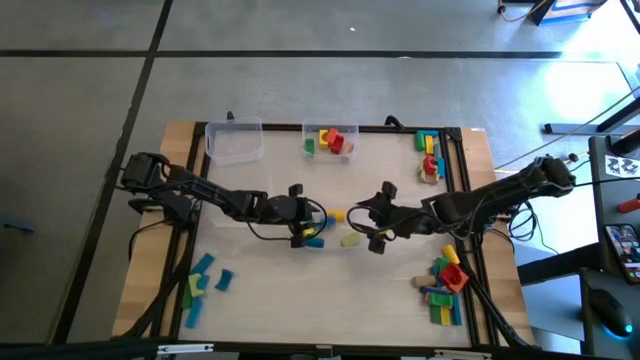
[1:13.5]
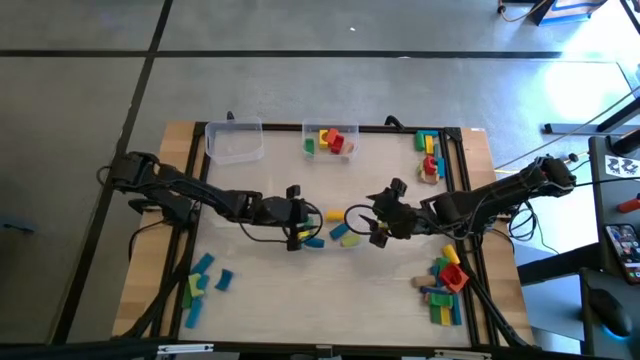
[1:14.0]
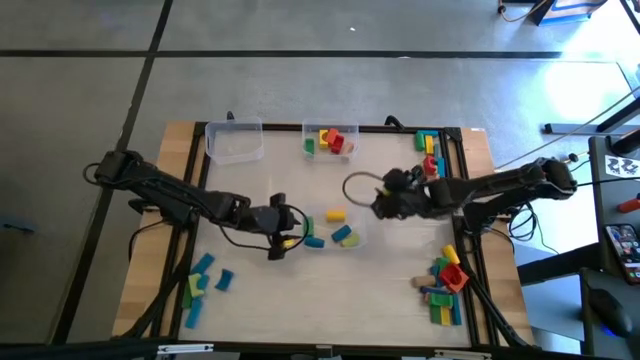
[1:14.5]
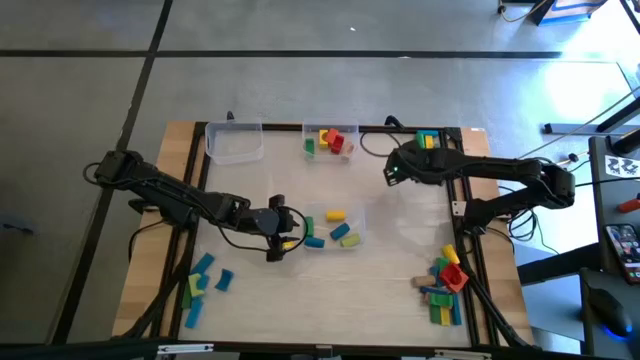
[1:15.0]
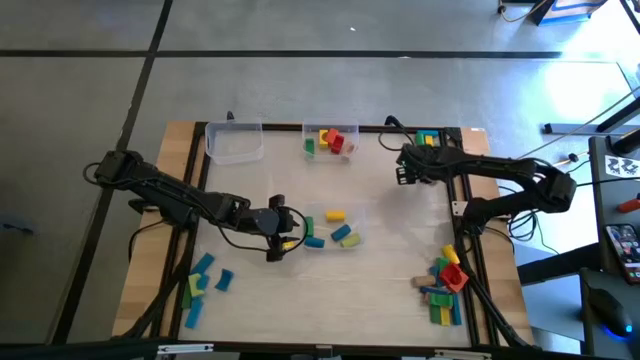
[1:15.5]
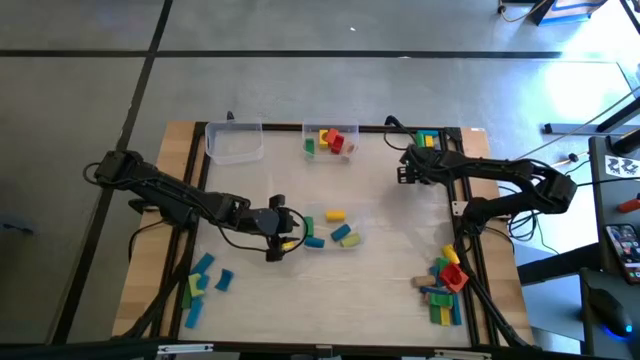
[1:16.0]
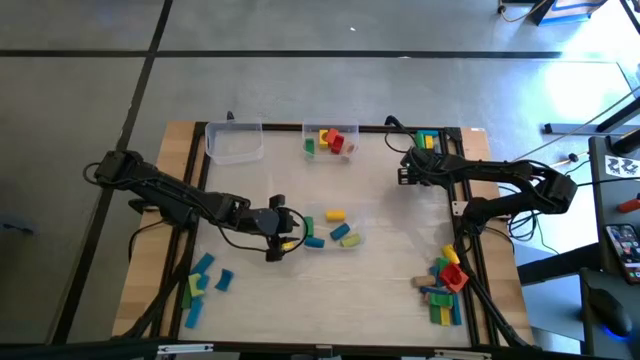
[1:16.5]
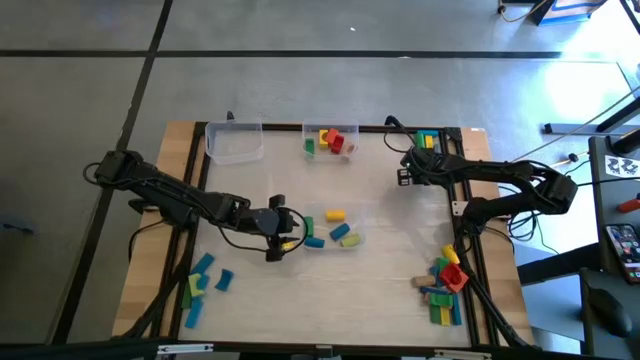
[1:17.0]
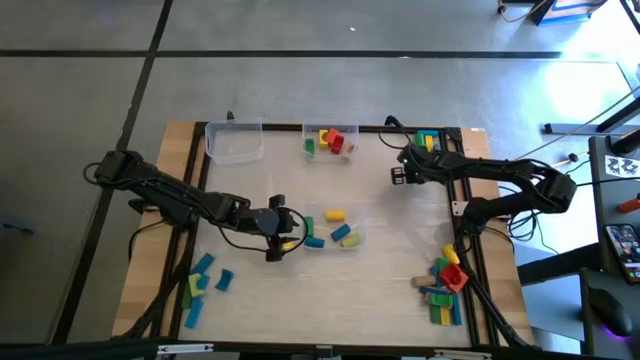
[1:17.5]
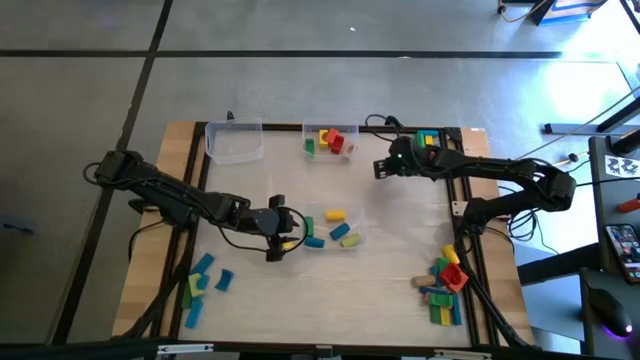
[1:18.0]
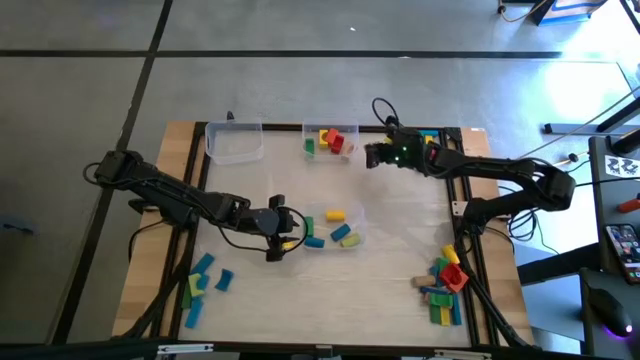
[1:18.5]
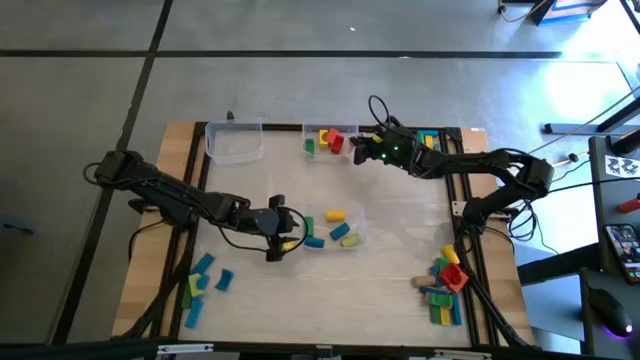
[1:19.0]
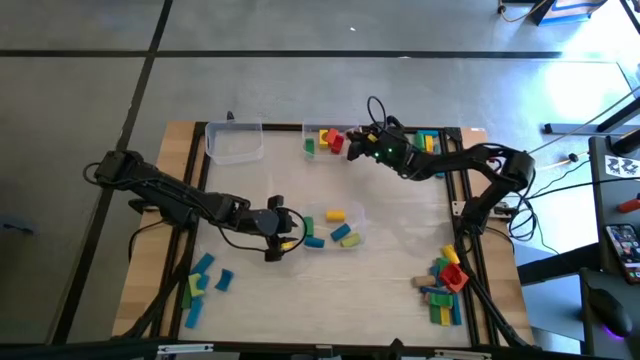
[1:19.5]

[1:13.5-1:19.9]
Task: Sort blocks by size
Put the brown arch block into the top right transparent bin

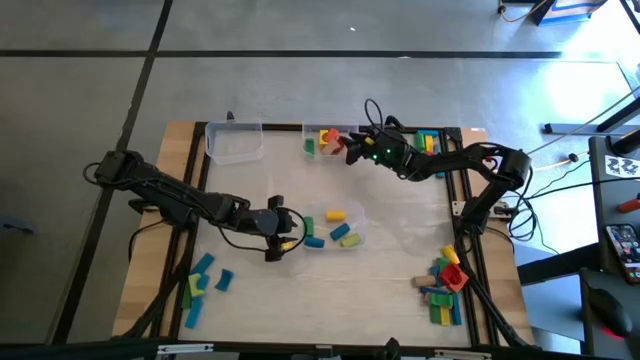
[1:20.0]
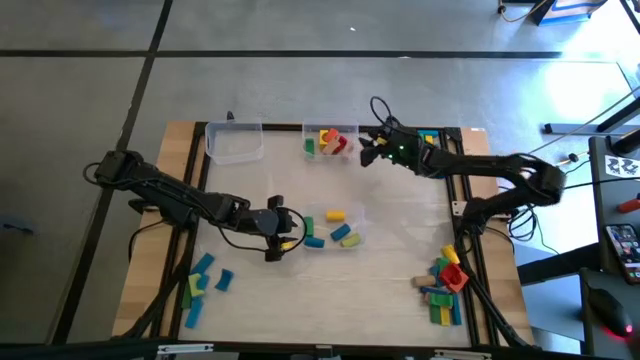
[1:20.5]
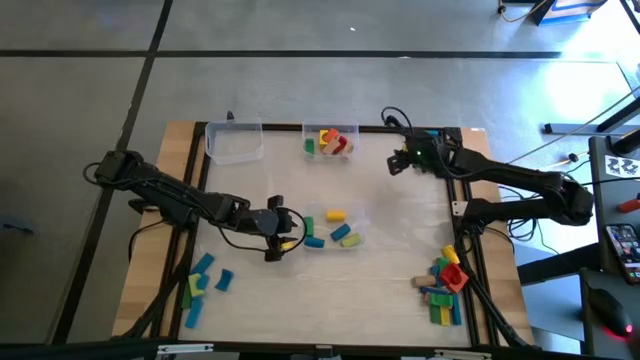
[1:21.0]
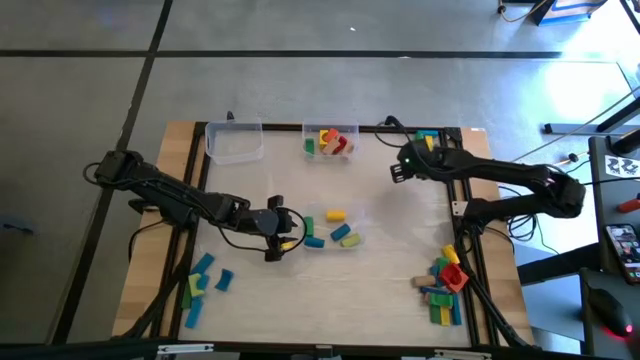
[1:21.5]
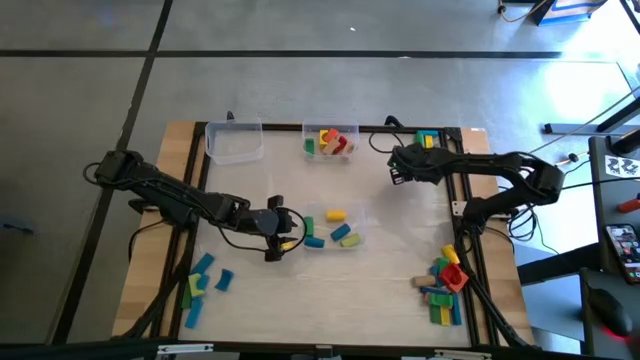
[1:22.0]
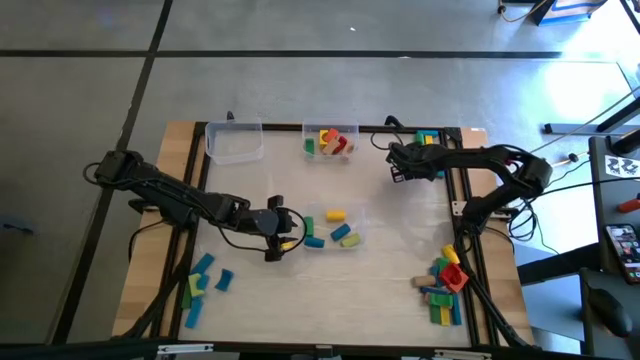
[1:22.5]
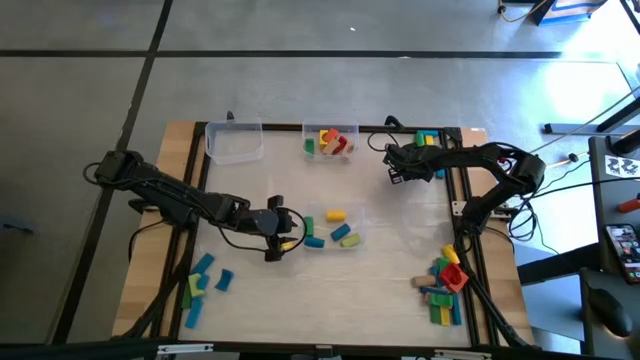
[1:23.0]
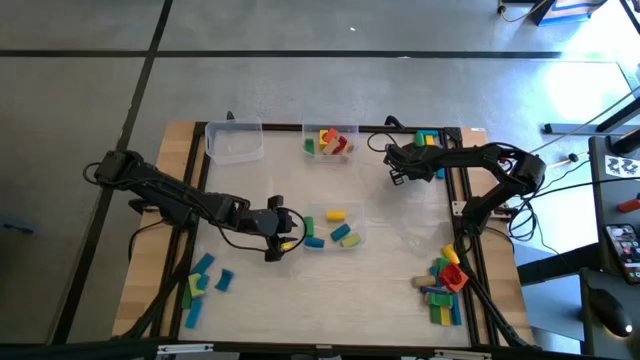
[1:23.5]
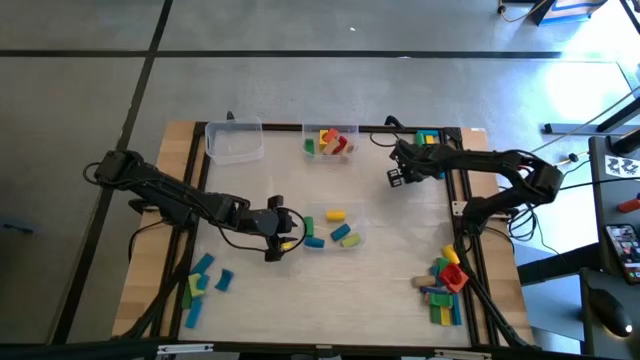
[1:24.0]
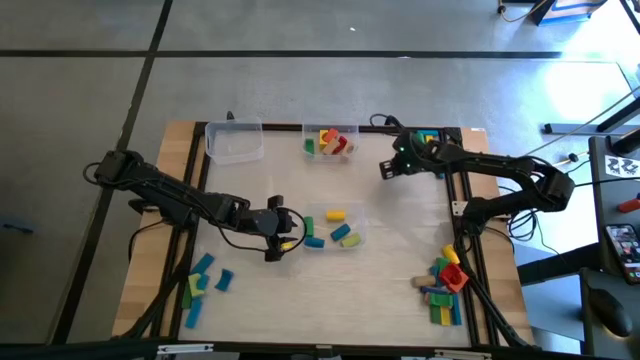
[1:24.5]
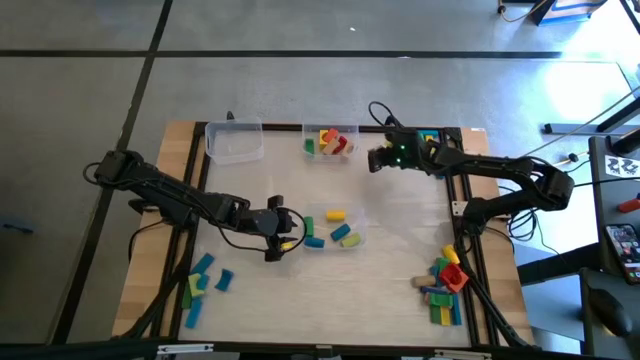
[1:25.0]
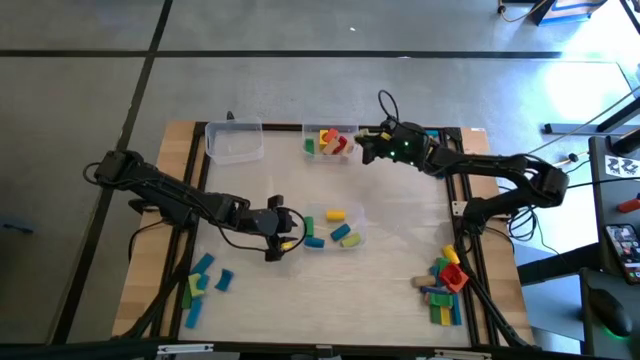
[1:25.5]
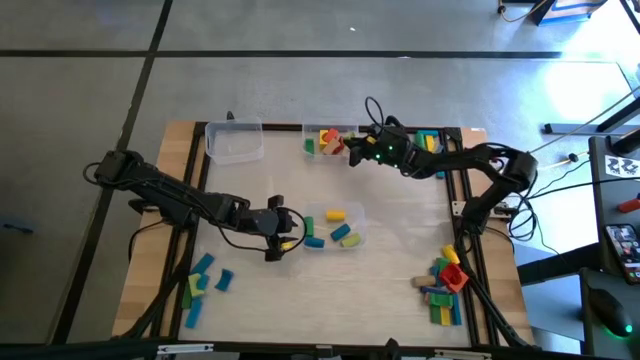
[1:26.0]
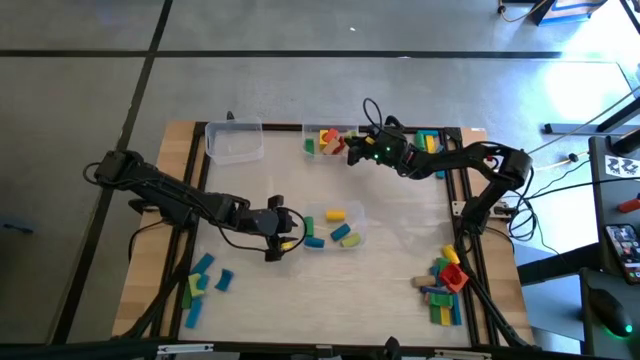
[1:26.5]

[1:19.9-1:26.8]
Put the light green arch block into the top right transparent bin

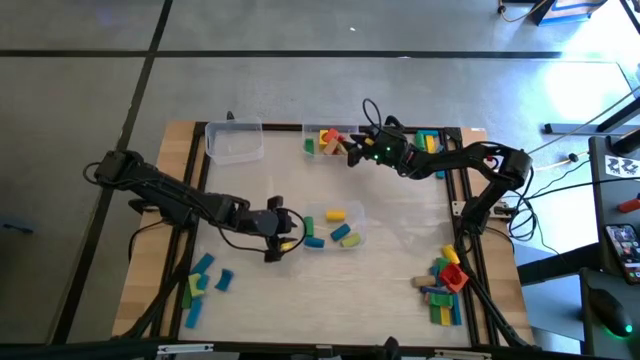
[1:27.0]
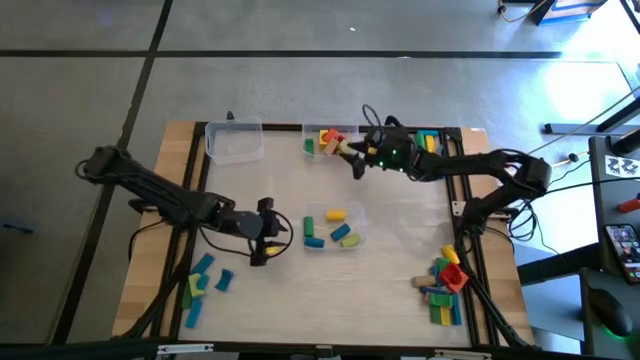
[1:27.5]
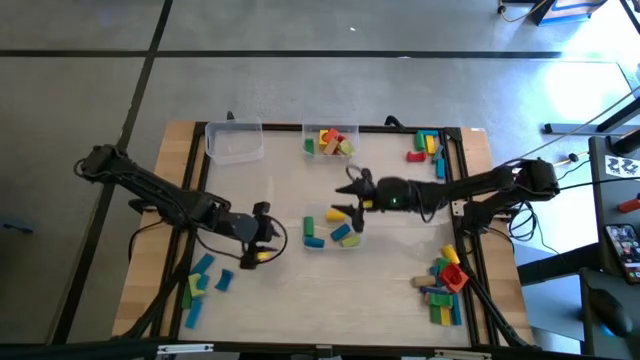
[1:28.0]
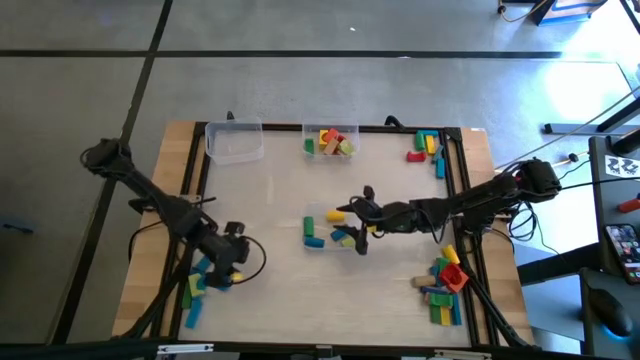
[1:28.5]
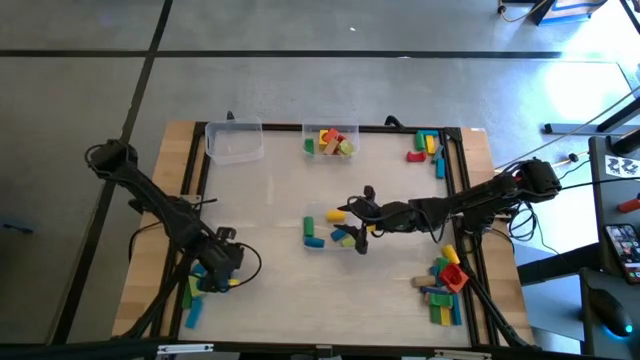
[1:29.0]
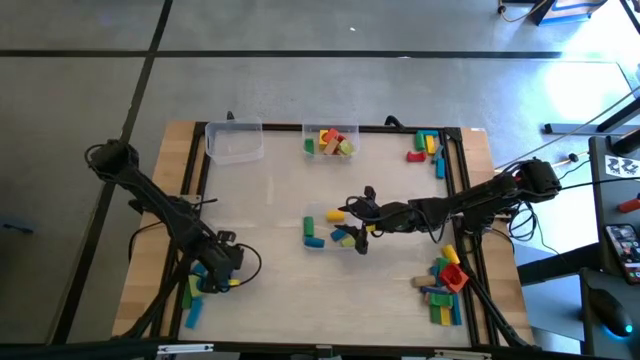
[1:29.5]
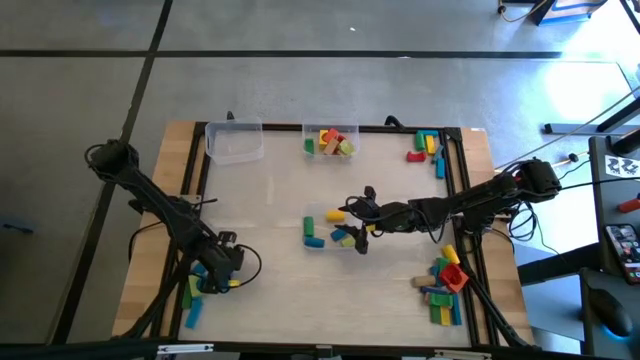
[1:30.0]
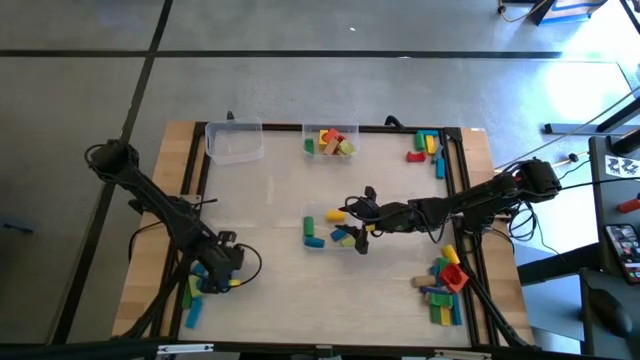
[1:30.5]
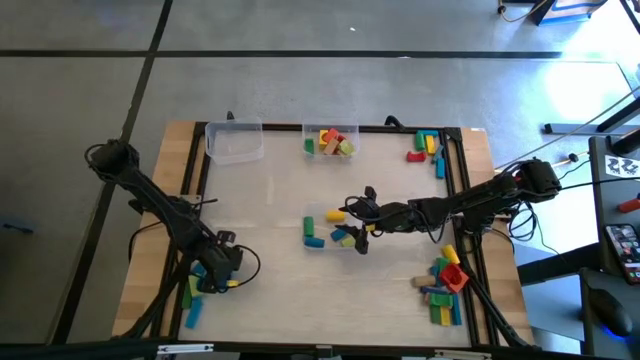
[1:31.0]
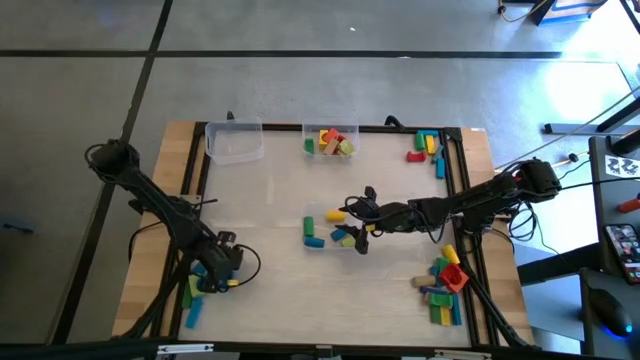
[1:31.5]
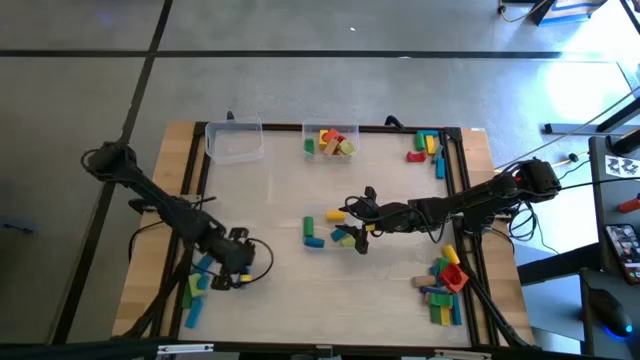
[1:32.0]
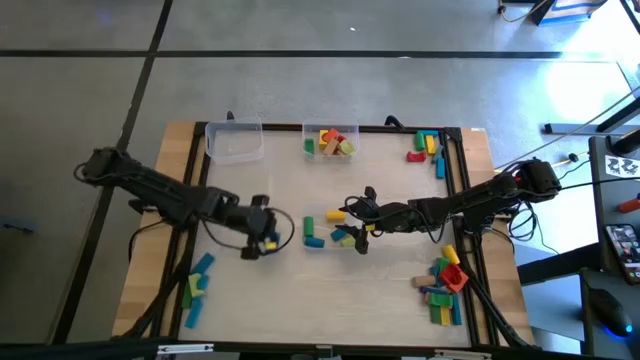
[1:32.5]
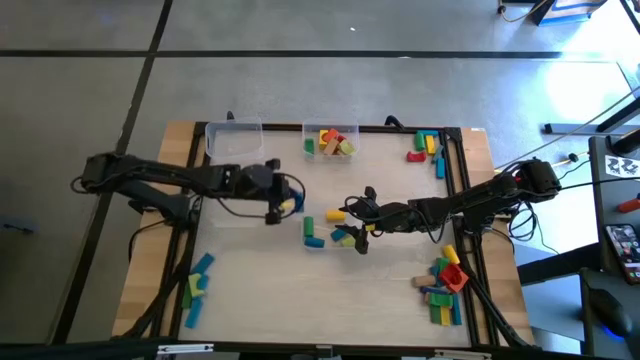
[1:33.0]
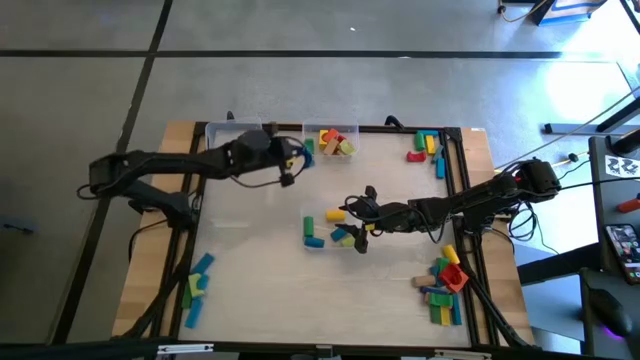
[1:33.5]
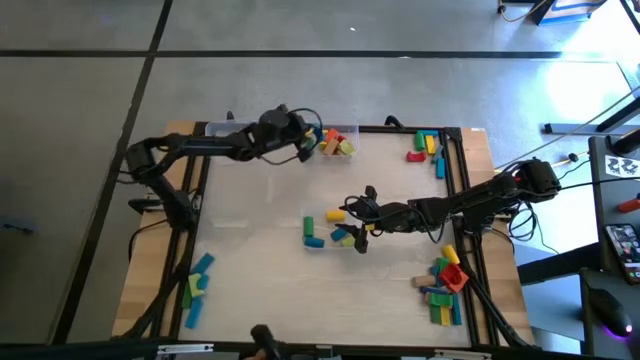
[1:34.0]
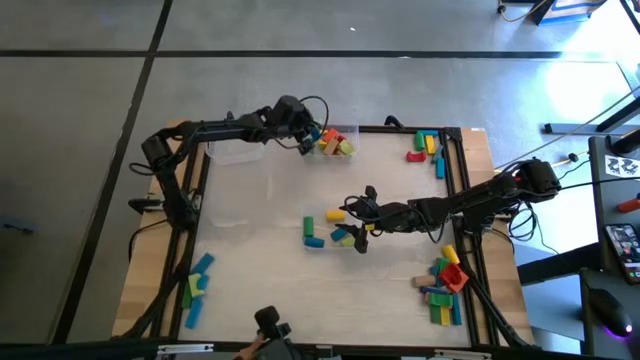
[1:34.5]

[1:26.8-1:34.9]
Put the blue arch block into the top right transparent bin
